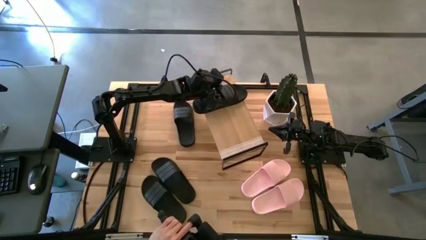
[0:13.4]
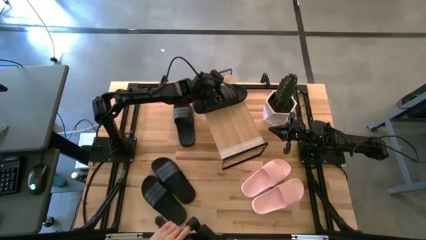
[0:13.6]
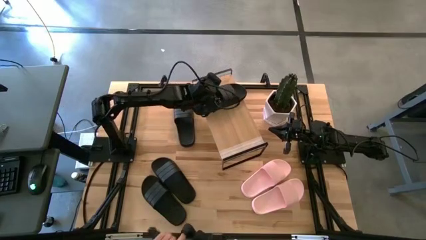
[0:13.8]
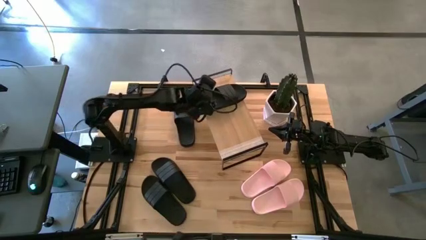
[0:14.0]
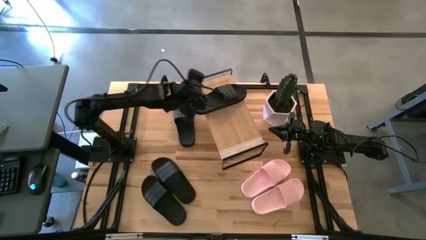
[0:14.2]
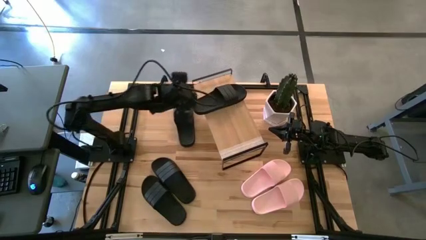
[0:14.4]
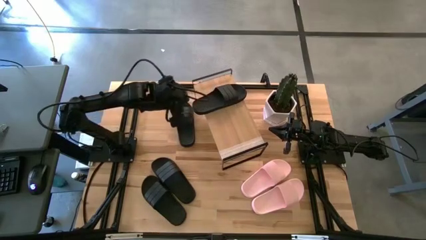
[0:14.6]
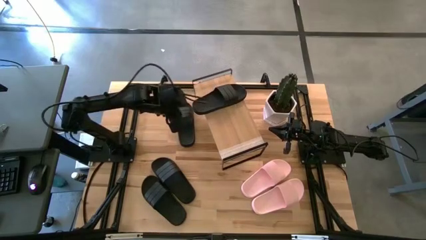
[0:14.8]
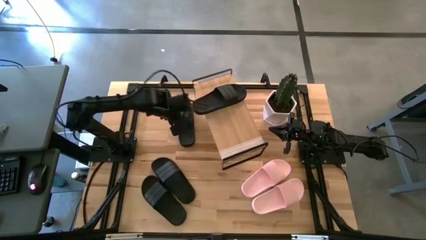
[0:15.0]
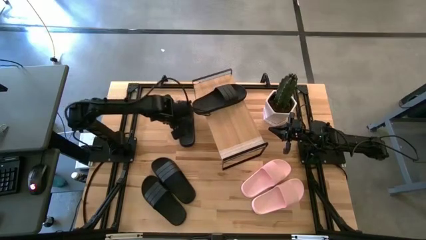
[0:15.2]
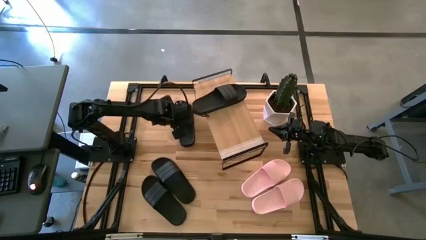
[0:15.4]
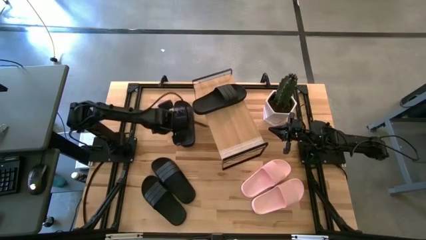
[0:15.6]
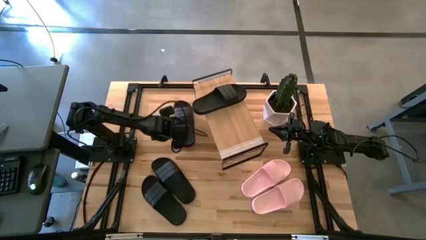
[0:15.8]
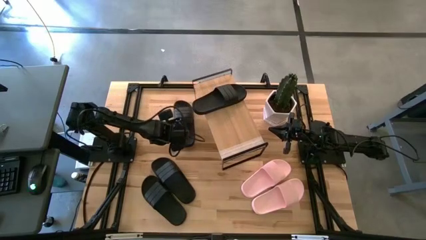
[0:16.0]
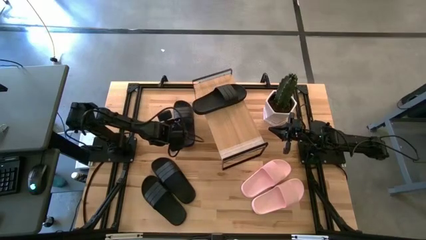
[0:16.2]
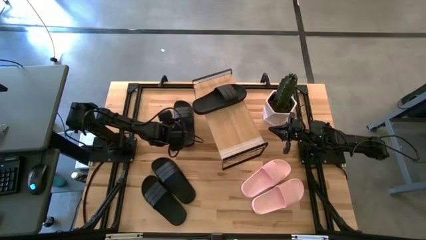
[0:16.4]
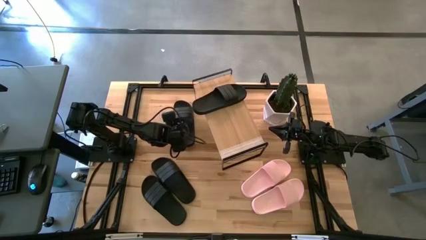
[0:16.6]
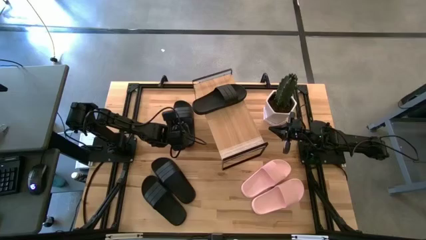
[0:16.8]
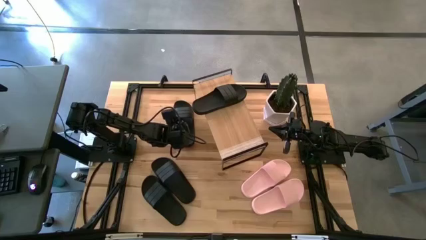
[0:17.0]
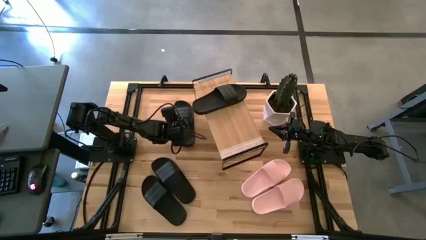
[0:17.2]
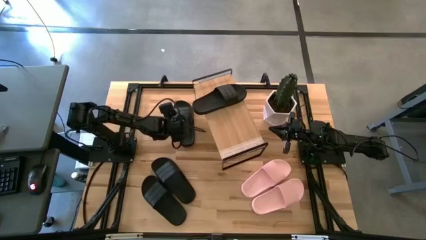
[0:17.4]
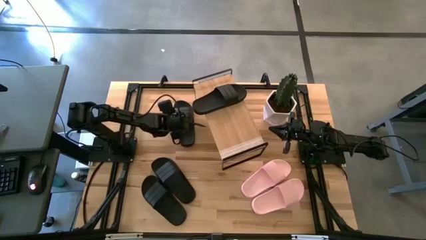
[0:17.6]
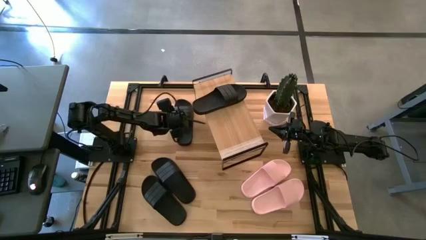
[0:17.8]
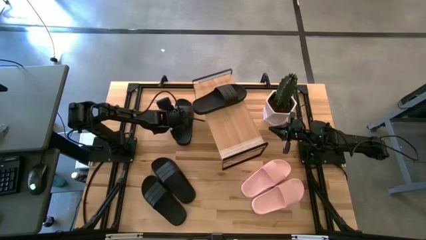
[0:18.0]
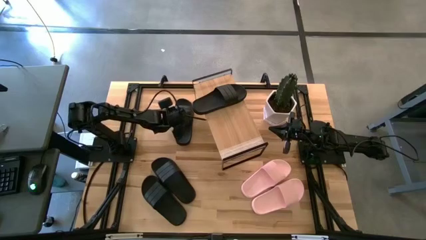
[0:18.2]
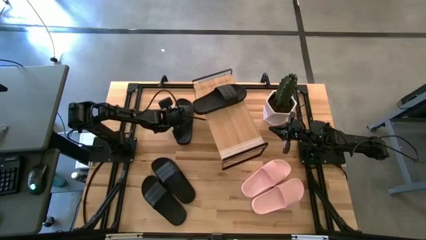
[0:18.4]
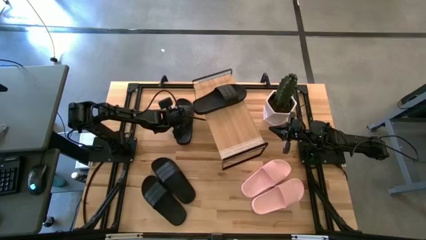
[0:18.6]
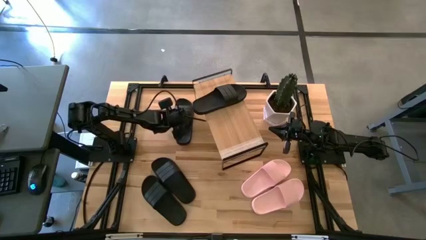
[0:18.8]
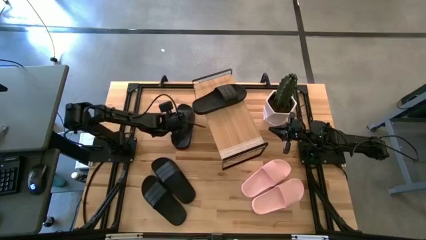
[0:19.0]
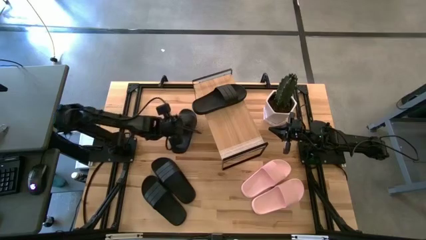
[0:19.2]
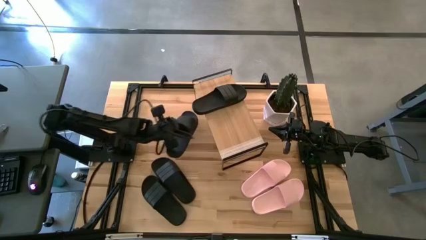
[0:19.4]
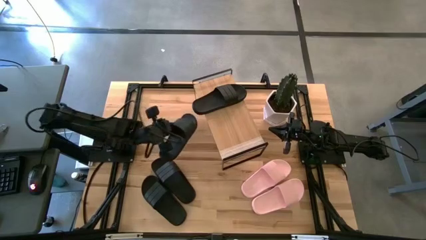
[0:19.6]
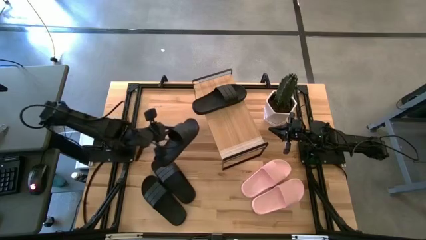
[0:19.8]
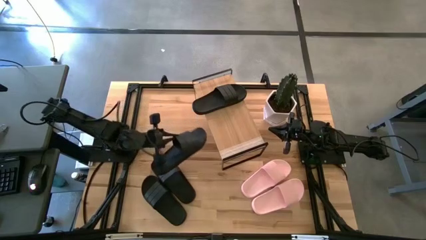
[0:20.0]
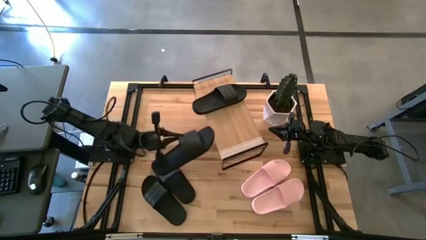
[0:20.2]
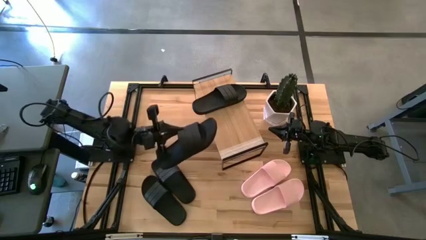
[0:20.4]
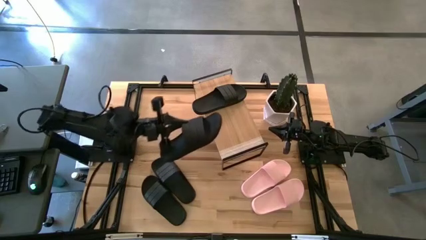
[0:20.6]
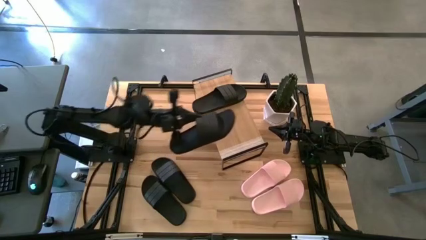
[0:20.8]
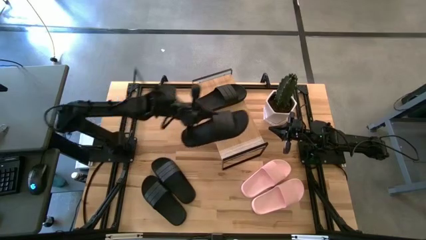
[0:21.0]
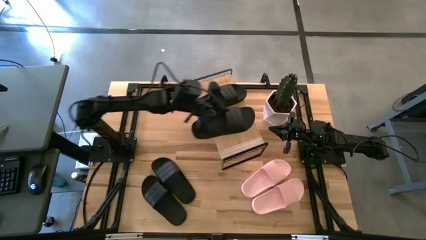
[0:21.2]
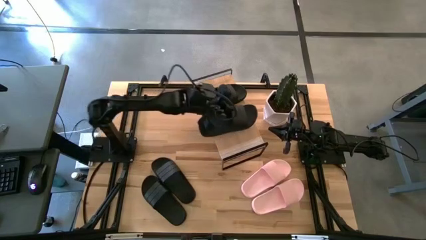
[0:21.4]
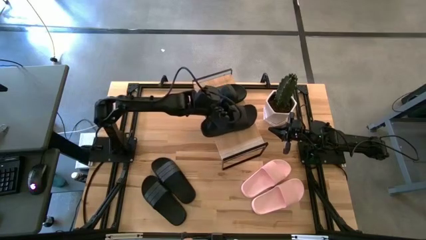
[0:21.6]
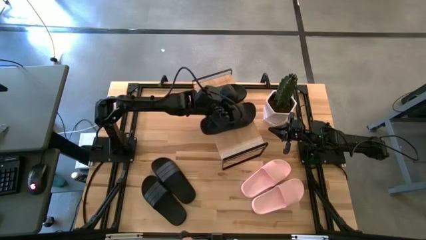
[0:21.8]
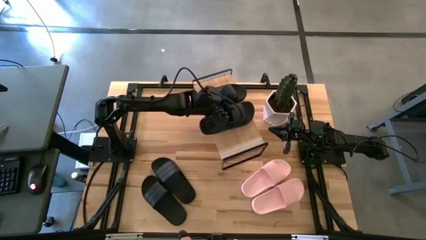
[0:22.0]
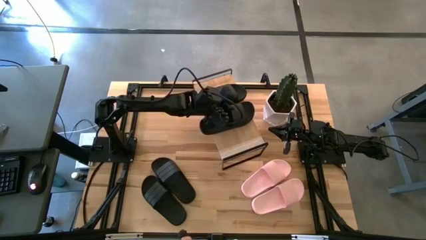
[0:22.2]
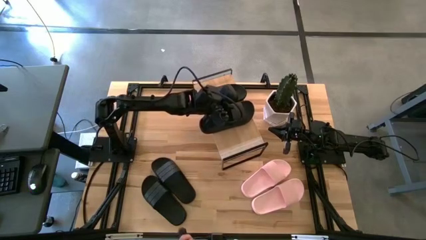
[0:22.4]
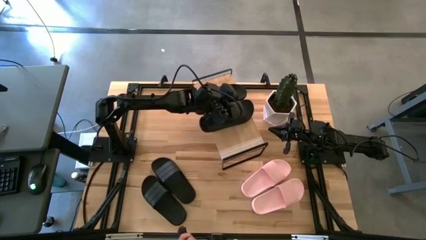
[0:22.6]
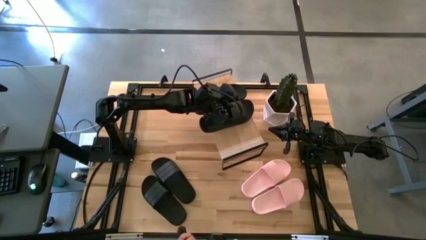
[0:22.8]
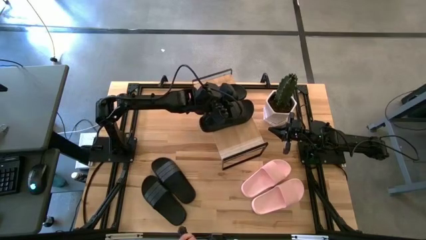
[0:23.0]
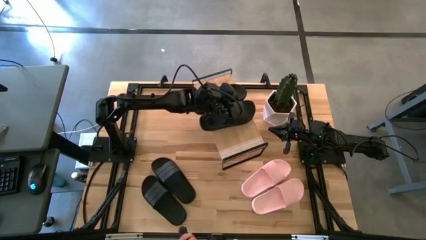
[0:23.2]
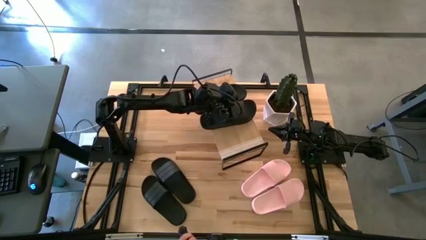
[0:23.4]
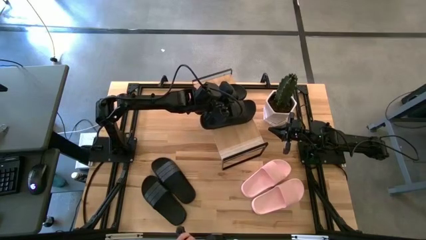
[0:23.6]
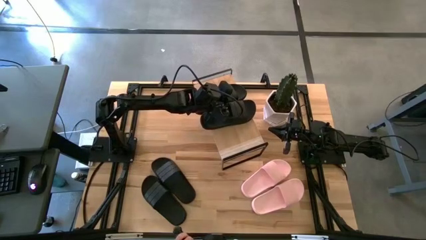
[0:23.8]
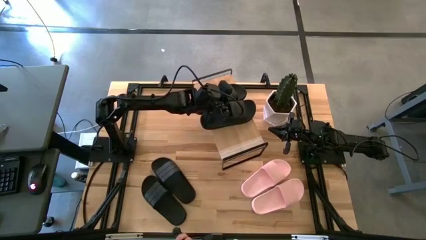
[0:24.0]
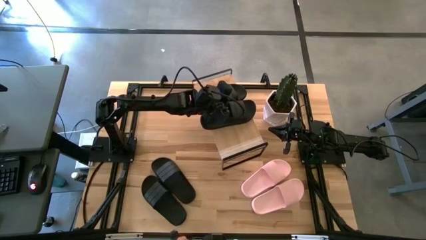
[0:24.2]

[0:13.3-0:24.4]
Task: Pick and place slides into the shelf
Put the black slide on the shelf

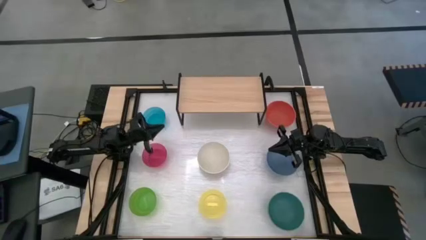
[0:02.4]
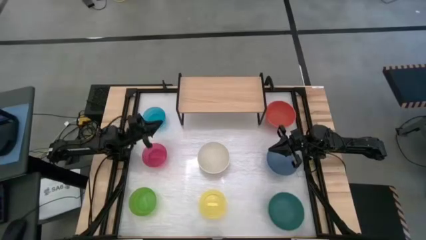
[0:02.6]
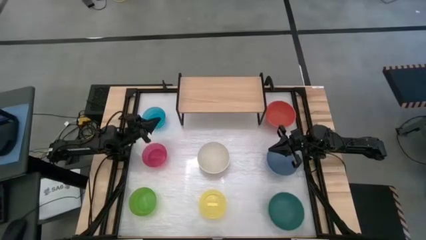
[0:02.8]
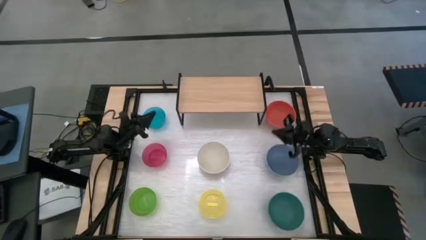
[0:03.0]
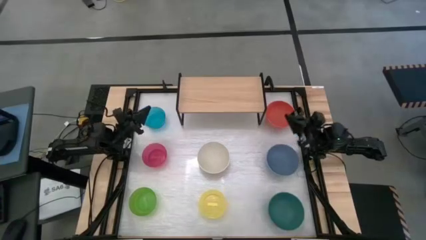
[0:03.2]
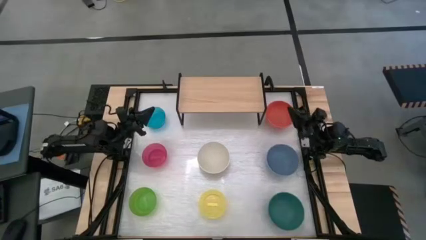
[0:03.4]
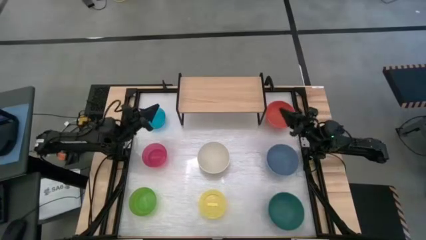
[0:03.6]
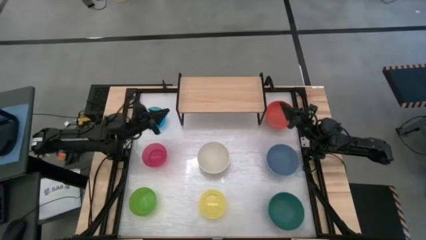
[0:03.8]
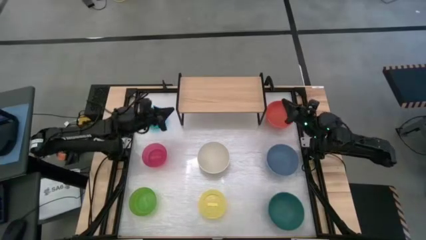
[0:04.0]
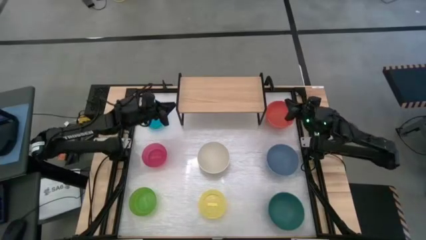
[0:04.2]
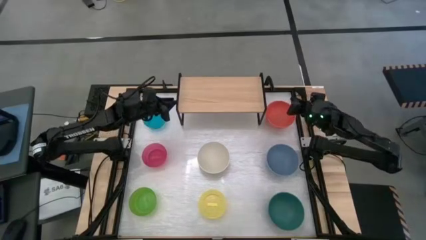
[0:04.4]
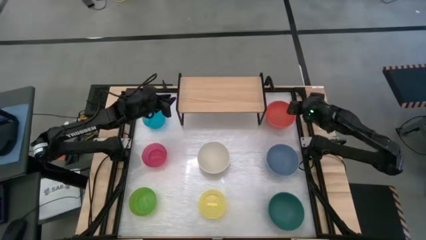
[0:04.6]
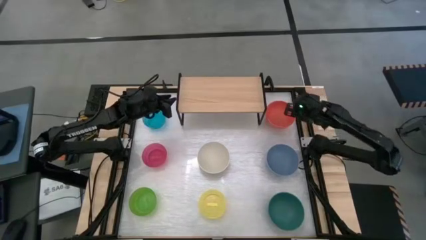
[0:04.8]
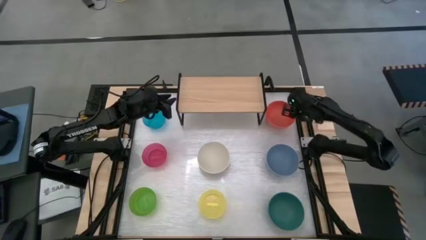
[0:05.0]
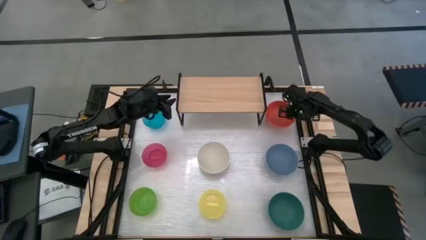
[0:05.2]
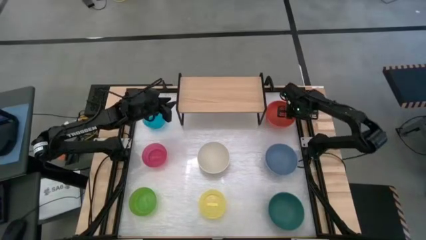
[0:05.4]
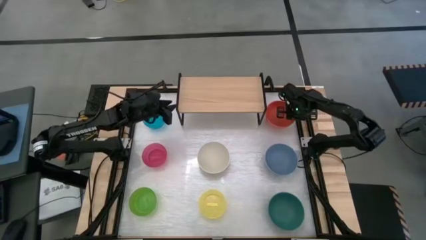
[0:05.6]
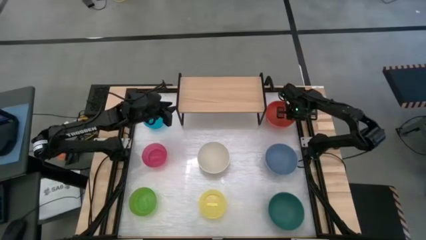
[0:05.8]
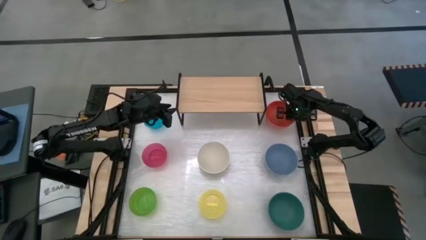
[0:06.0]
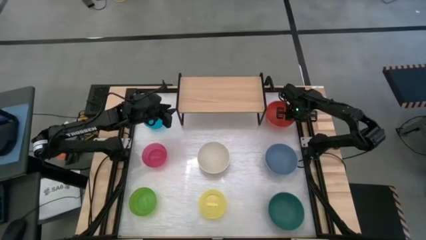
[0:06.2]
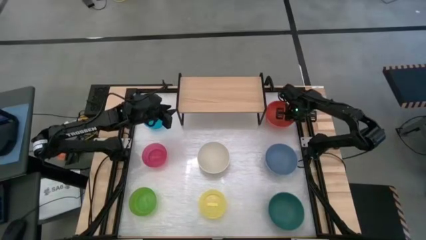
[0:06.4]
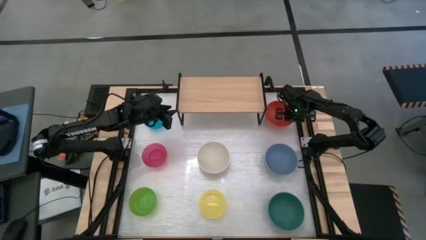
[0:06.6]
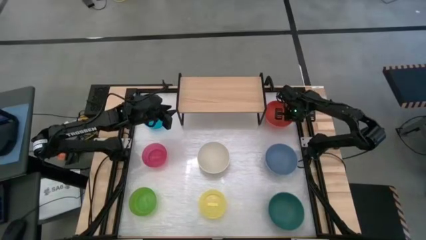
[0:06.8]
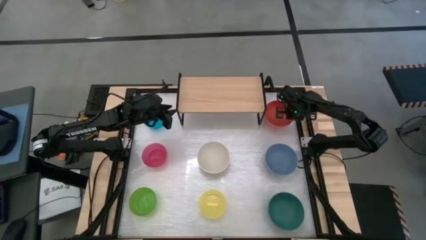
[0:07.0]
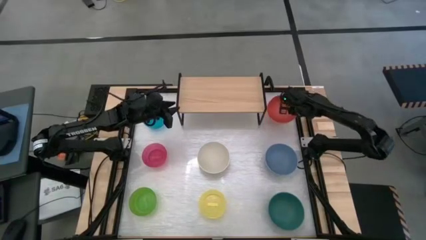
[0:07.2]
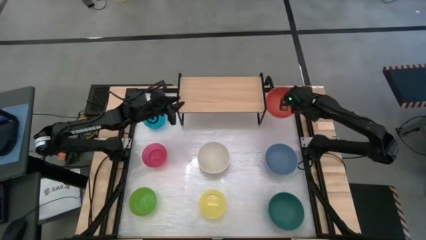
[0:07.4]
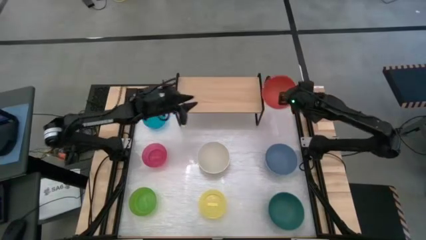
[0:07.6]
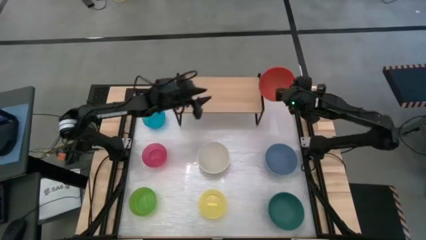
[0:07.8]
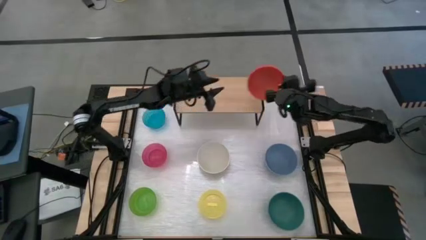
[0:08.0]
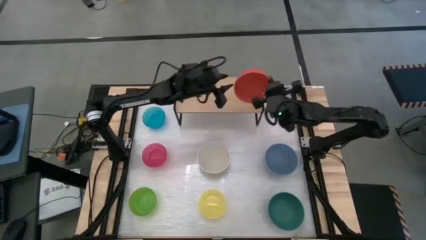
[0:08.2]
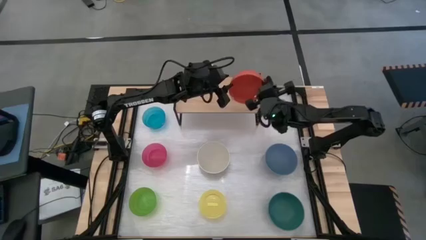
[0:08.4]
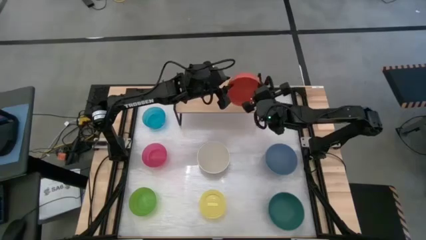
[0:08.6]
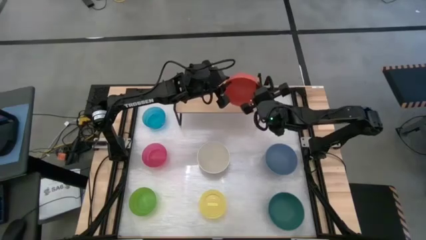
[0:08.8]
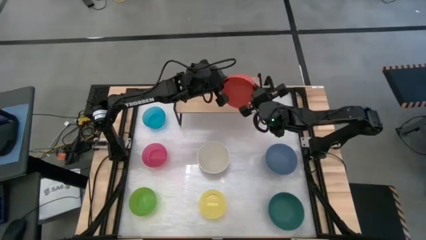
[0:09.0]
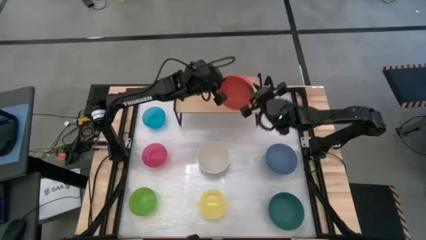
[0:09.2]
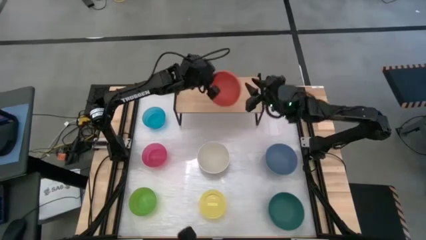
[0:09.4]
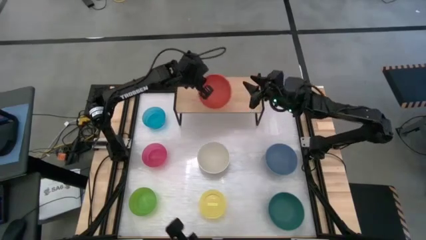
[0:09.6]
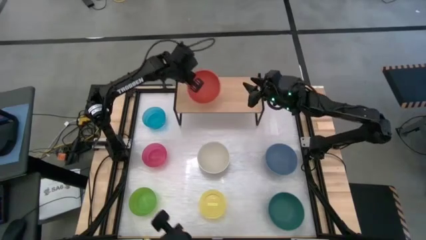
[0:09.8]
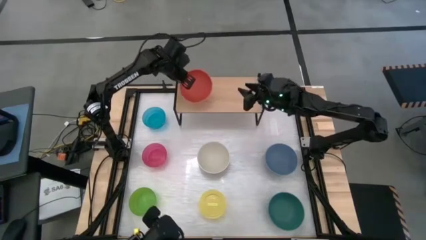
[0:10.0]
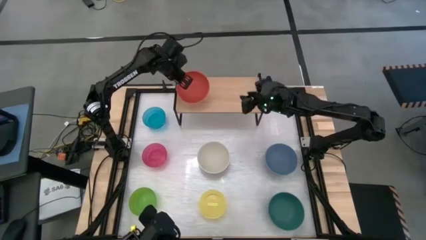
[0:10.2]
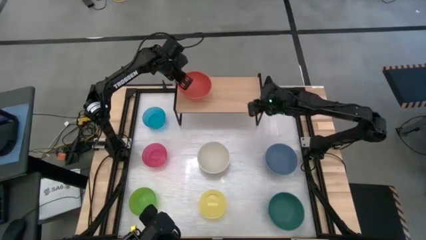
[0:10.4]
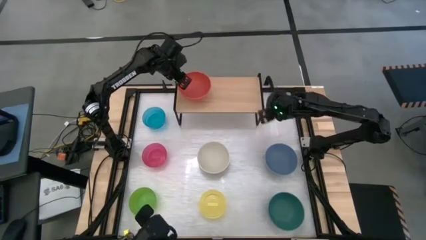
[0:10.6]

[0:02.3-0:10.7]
Task: Place and stack bowls onto a shelf
Put the orange bowl on the shelf
